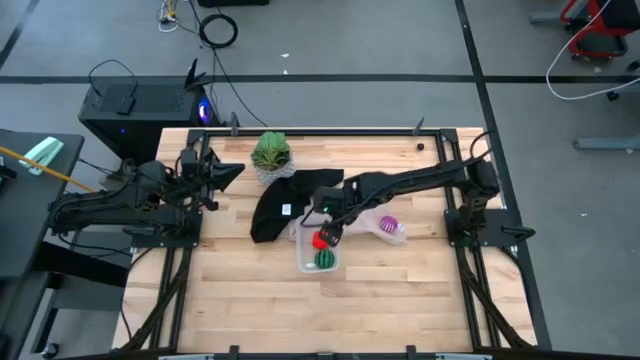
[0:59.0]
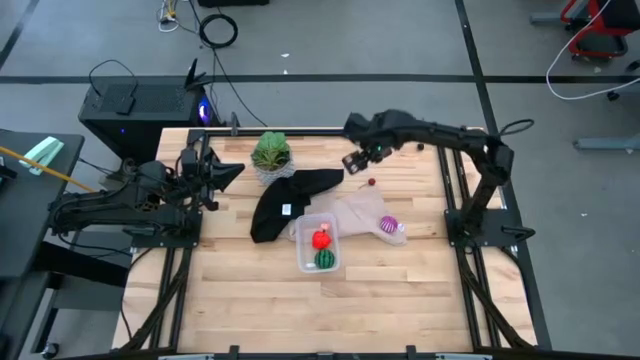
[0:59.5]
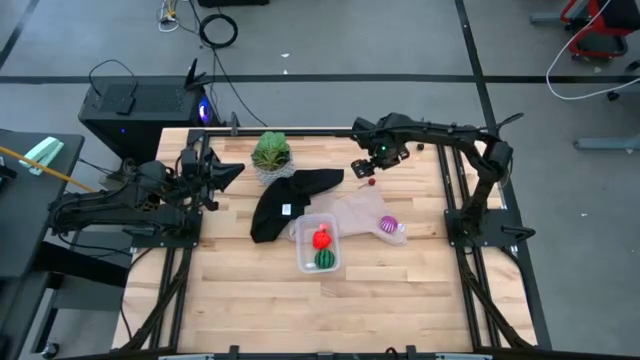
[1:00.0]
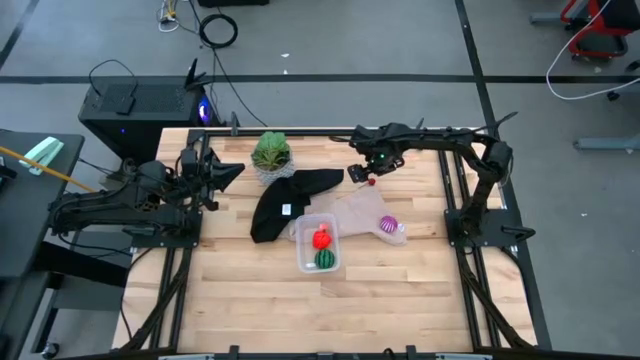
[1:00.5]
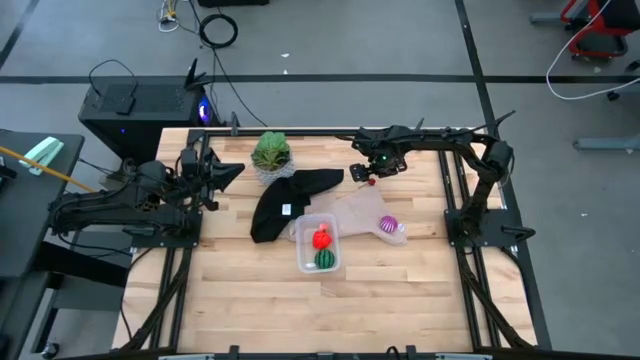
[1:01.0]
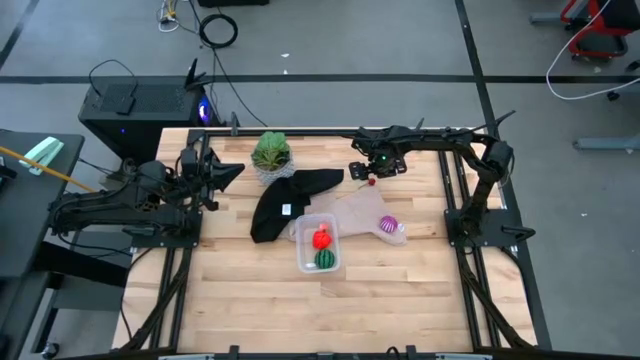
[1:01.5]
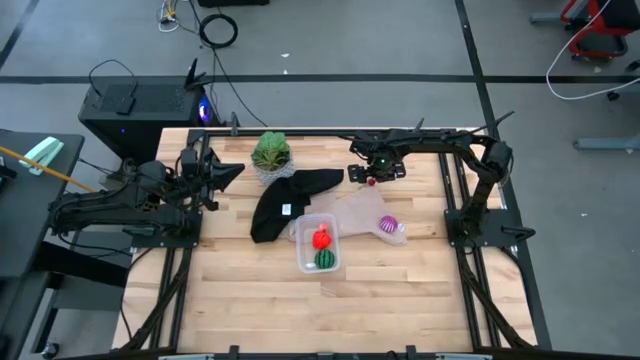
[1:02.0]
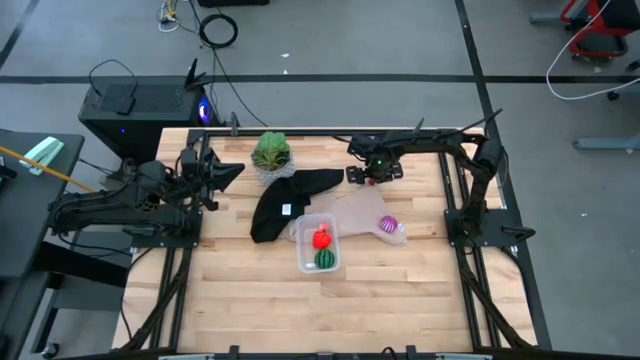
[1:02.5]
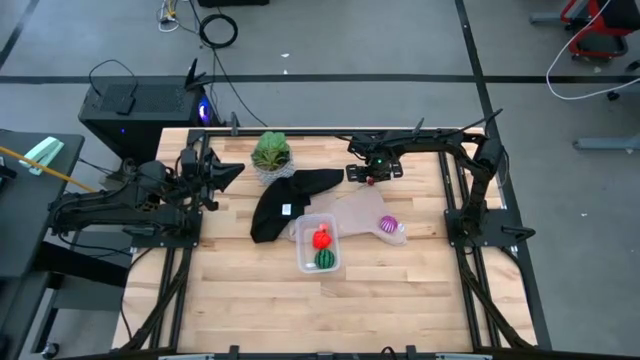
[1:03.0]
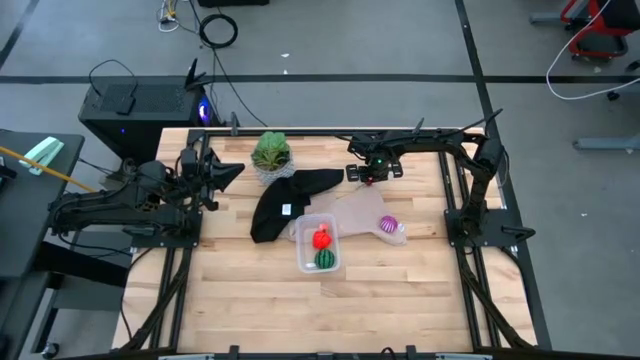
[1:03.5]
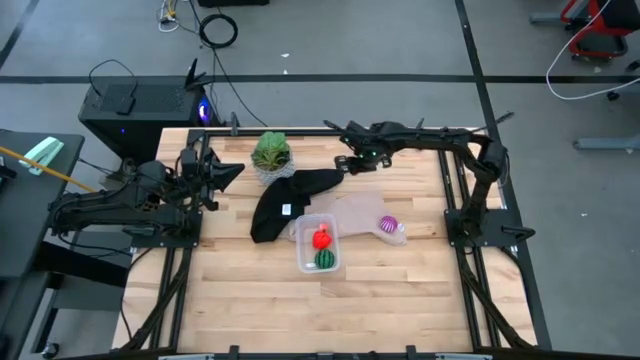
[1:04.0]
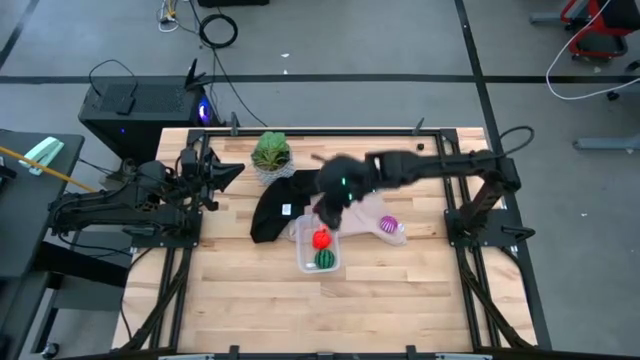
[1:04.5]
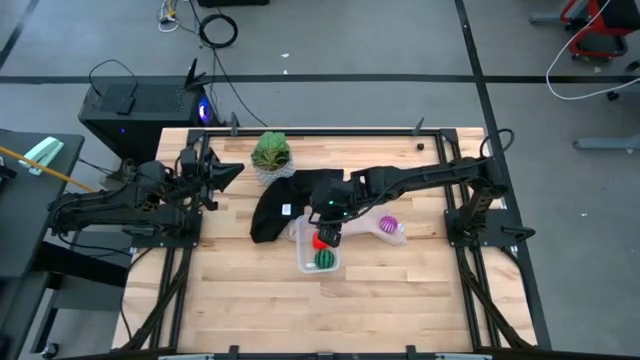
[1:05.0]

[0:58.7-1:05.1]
Task: Pick and placing Produce into tupperware
Put the red cherry into the transparent container

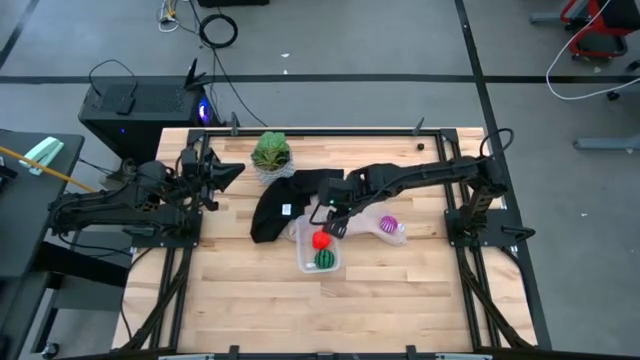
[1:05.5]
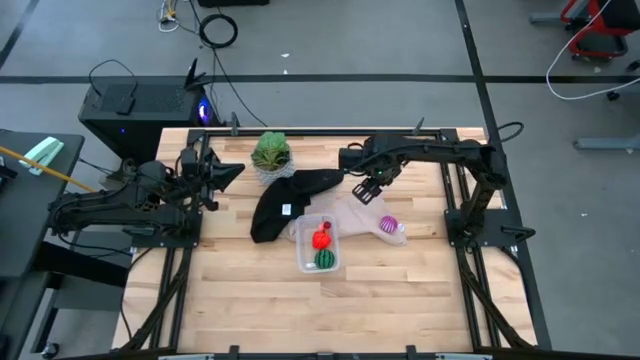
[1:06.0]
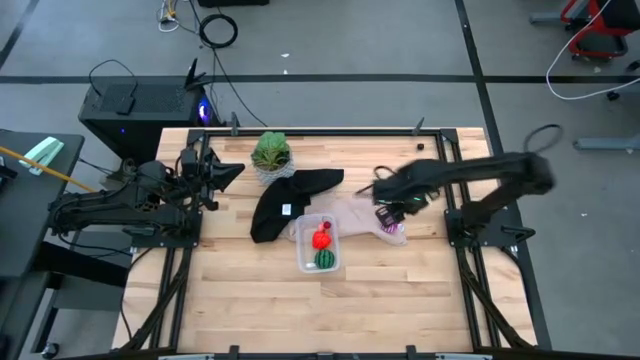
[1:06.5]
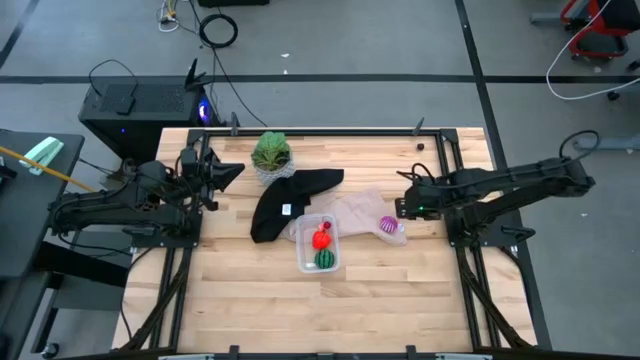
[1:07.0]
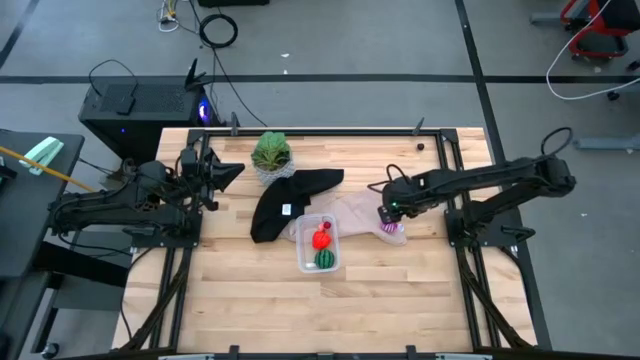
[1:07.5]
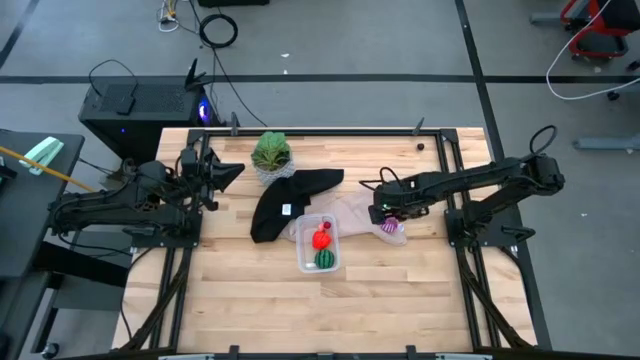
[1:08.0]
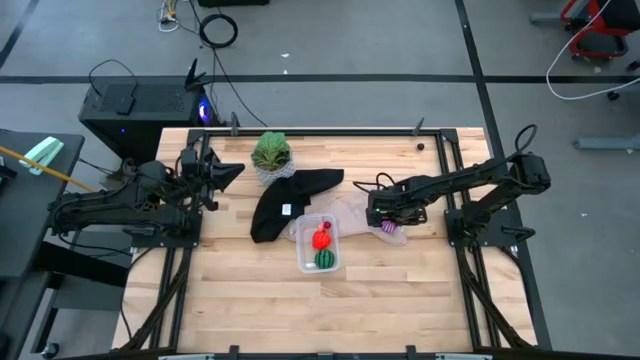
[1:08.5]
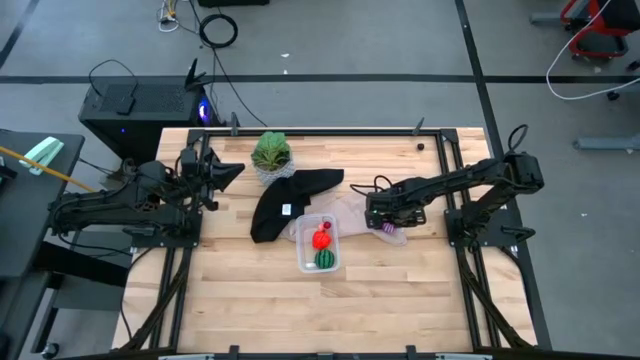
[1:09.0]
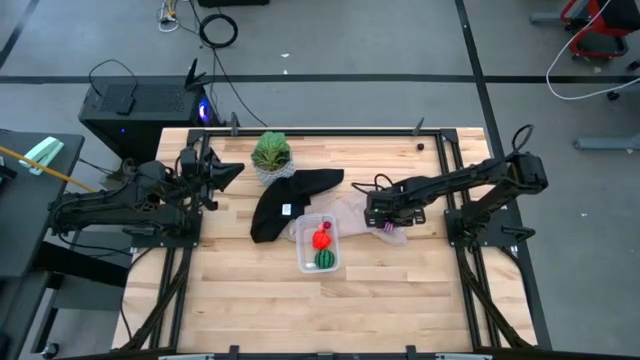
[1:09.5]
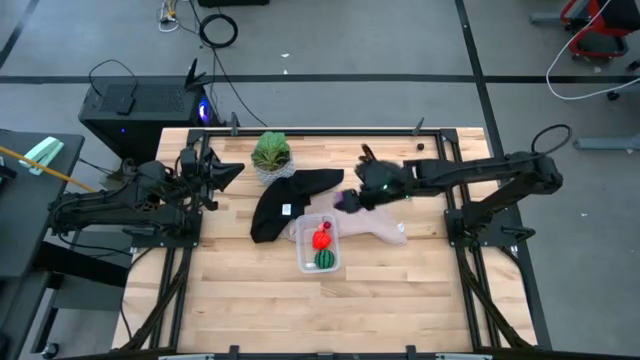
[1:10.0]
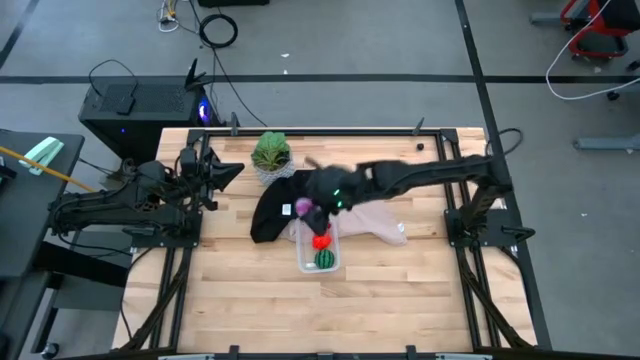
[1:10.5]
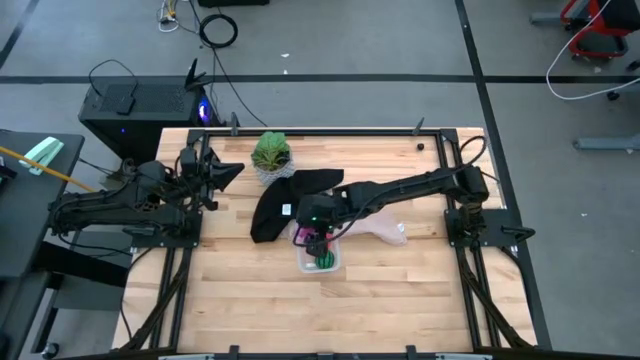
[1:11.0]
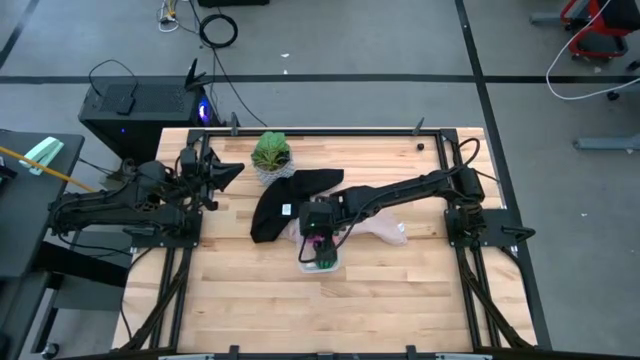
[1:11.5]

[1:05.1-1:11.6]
Put the red onion into the transparent container

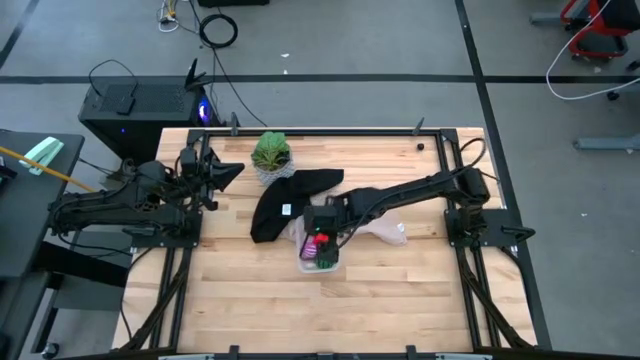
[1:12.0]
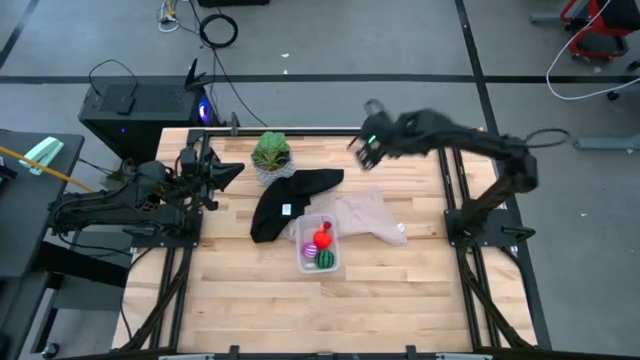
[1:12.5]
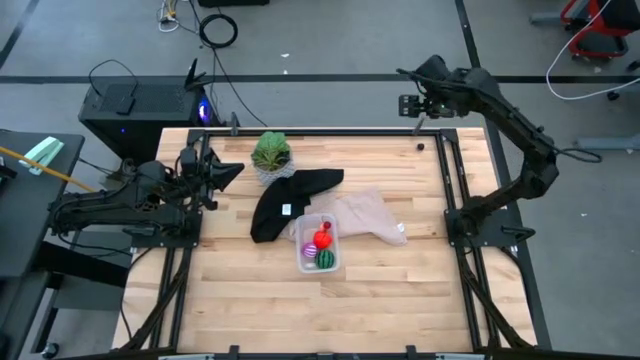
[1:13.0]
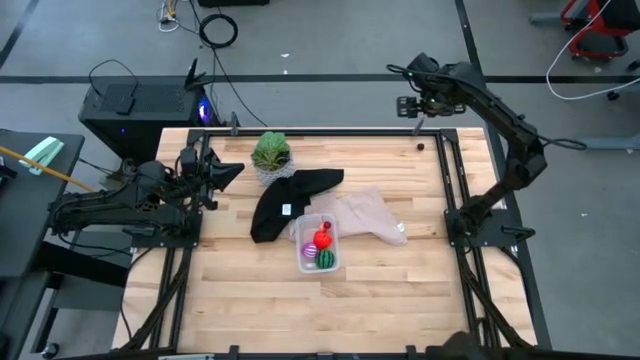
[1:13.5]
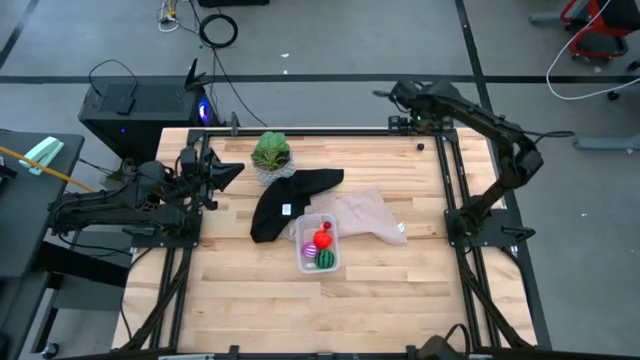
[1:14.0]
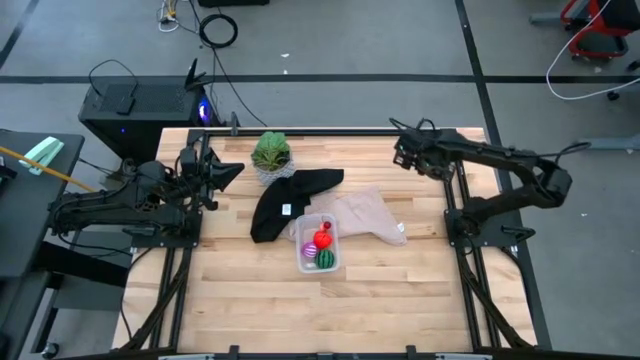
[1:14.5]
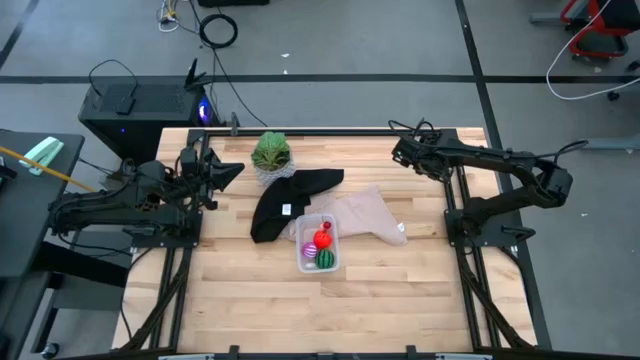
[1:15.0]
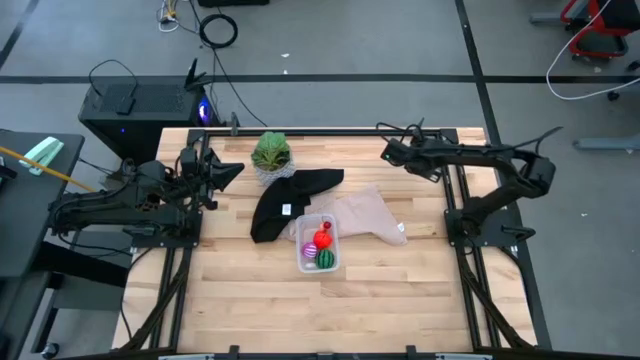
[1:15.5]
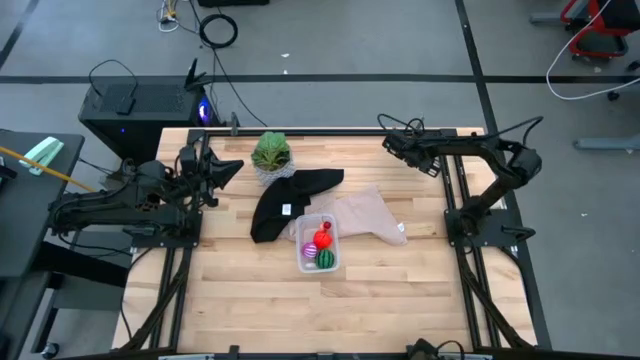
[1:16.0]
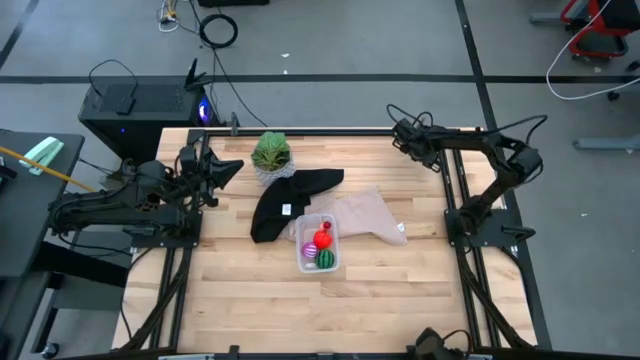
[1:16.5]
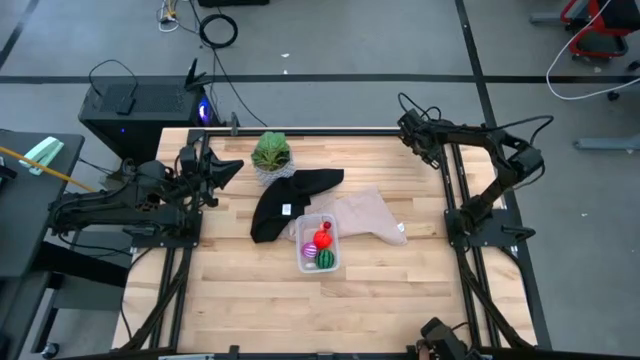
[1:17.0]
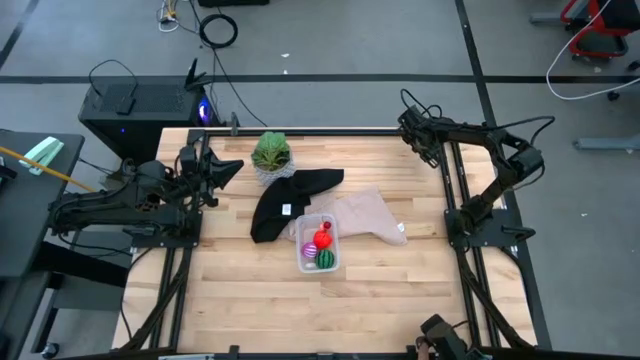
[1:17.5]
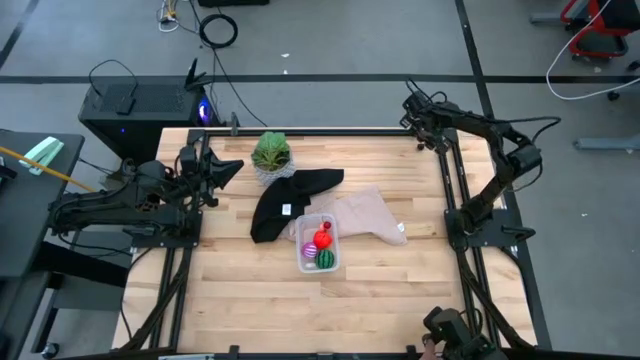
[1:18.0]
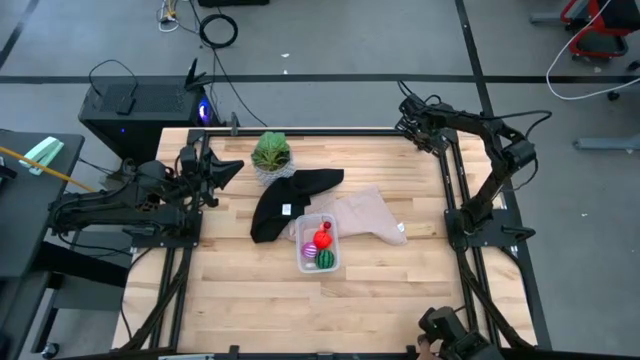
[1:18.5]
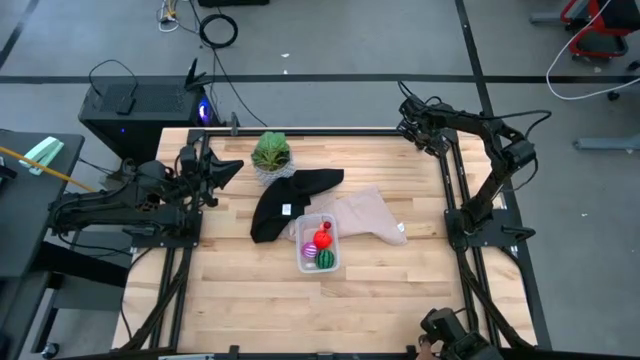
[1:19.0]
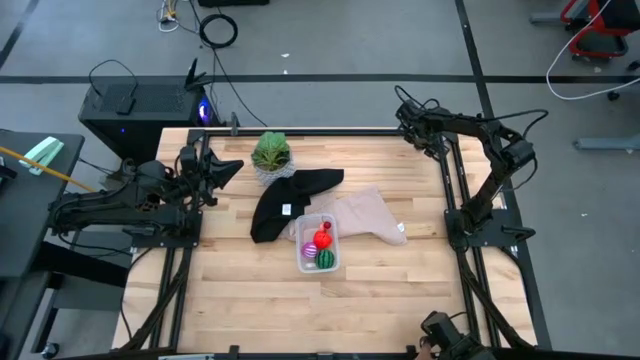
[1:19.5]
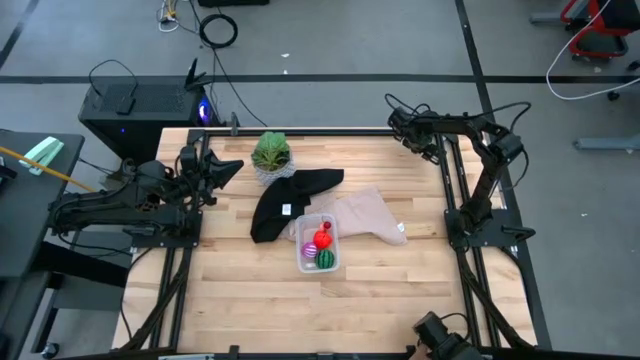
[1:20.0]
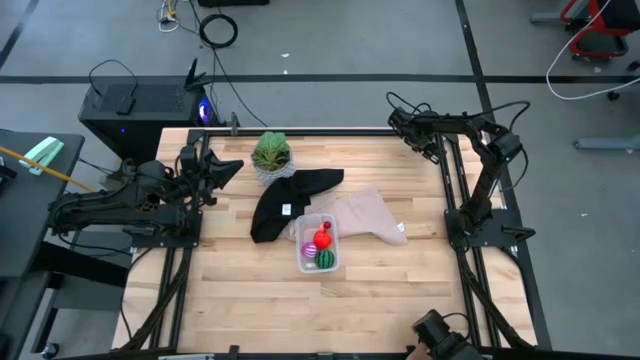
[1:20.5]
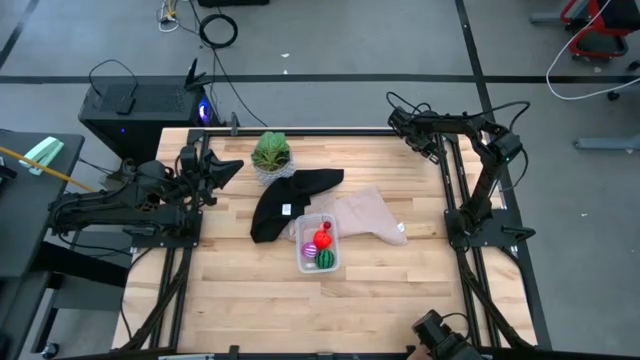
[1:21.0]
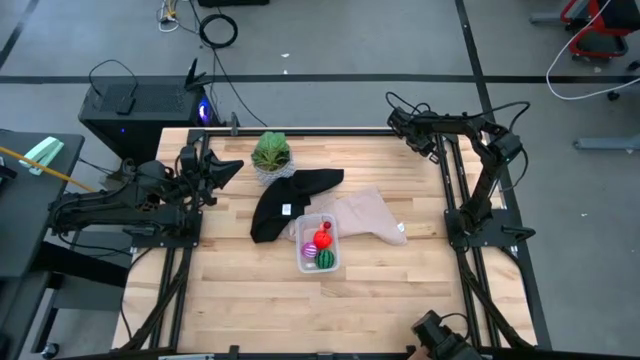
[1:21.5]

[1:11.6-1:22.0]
Put the plum into the transparent container
